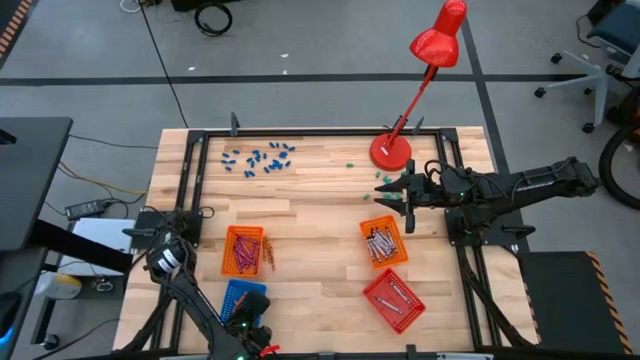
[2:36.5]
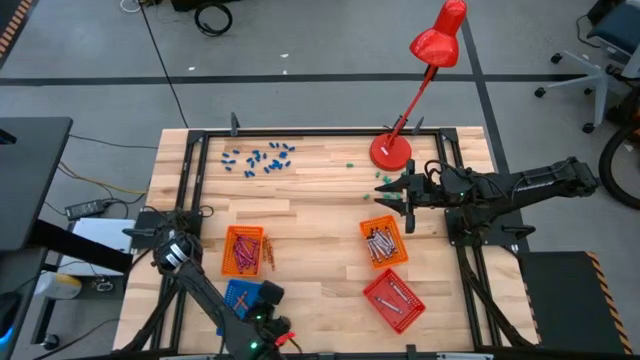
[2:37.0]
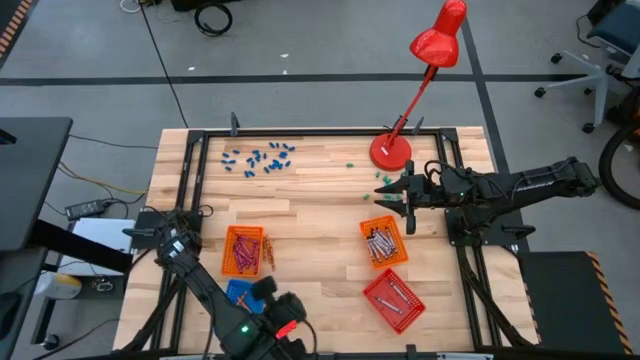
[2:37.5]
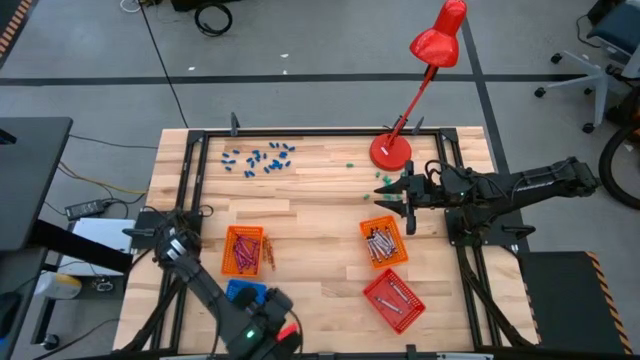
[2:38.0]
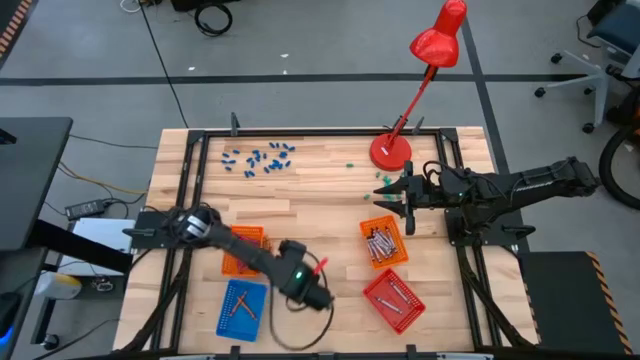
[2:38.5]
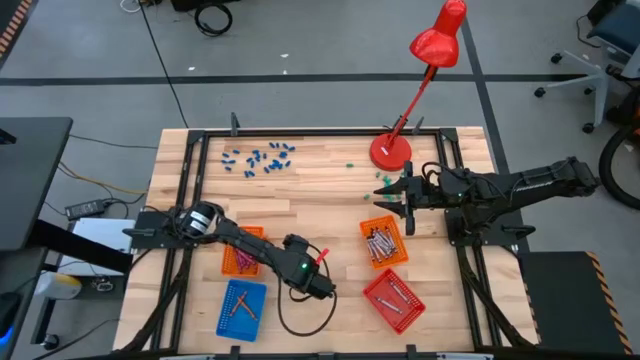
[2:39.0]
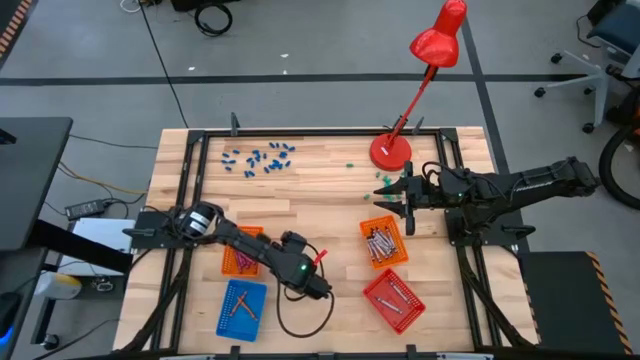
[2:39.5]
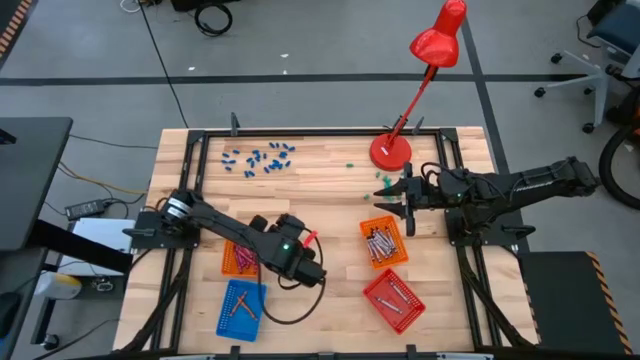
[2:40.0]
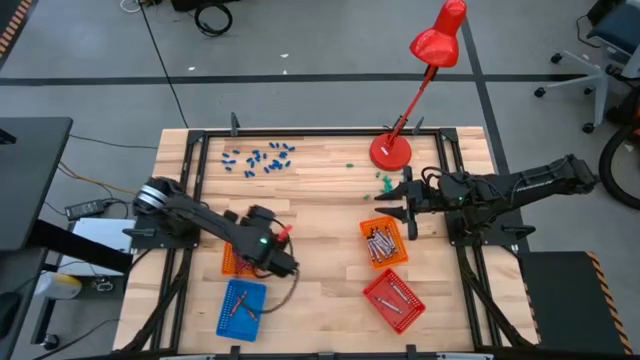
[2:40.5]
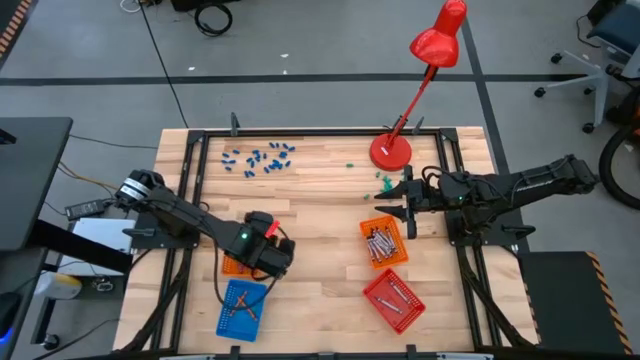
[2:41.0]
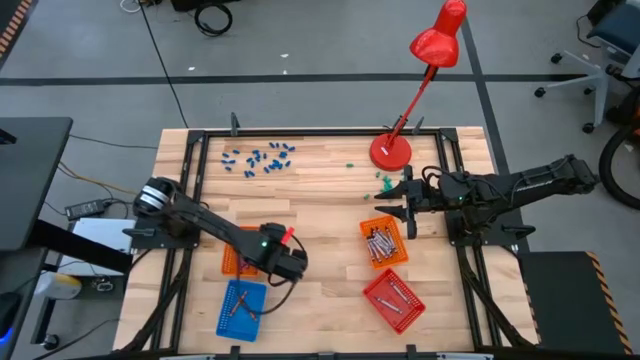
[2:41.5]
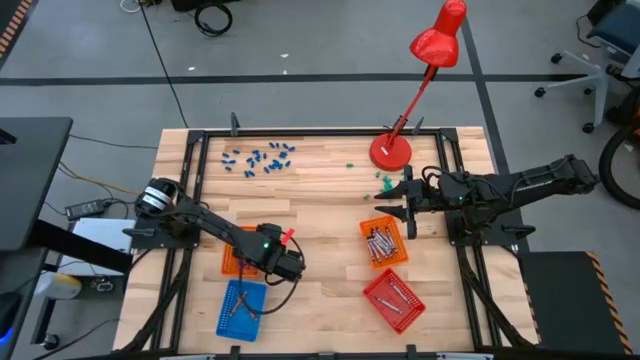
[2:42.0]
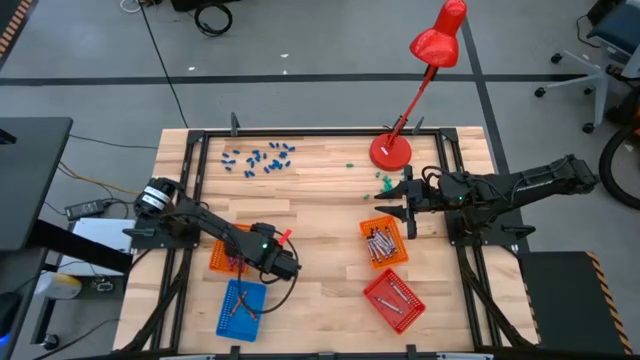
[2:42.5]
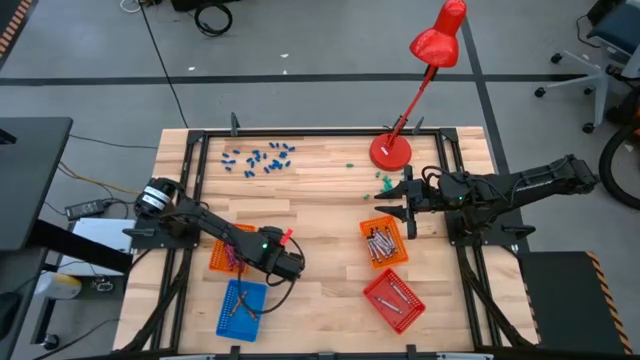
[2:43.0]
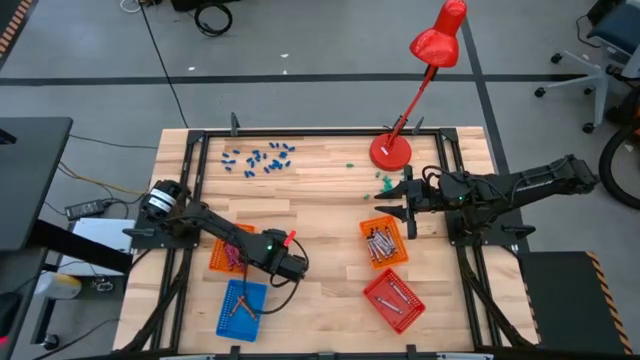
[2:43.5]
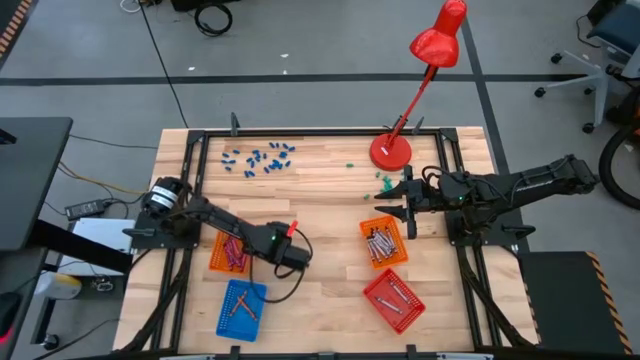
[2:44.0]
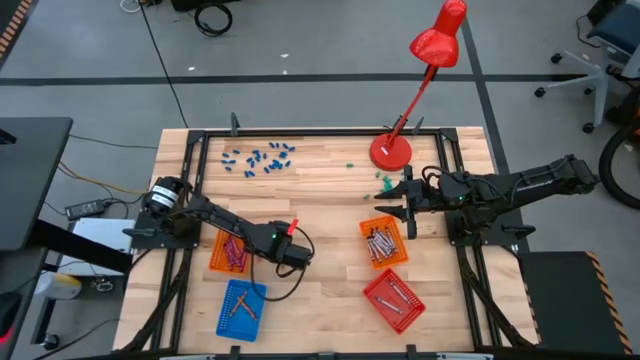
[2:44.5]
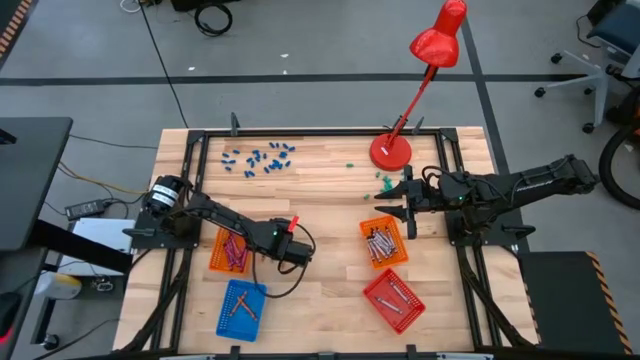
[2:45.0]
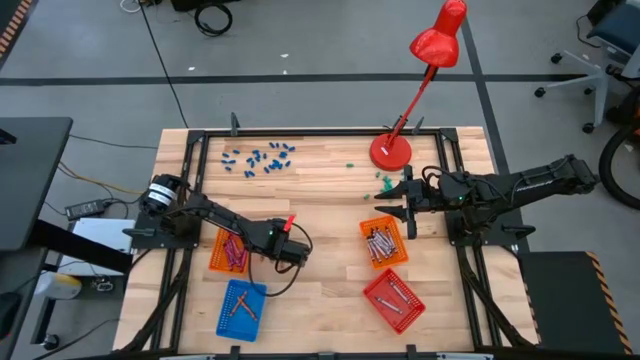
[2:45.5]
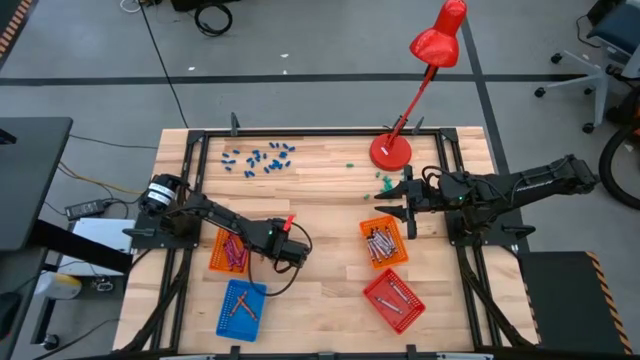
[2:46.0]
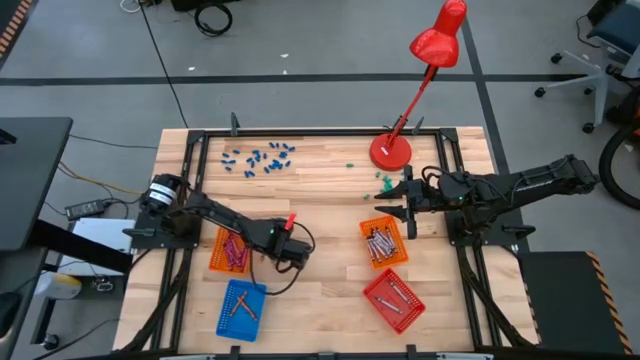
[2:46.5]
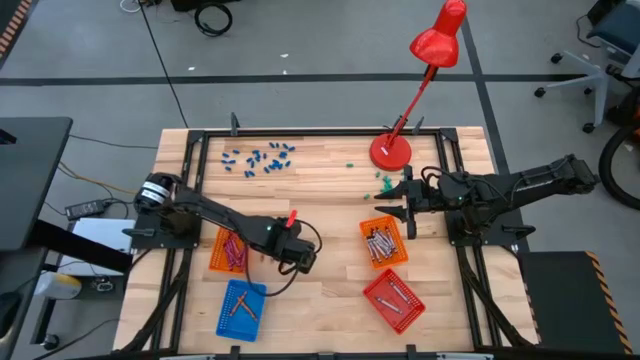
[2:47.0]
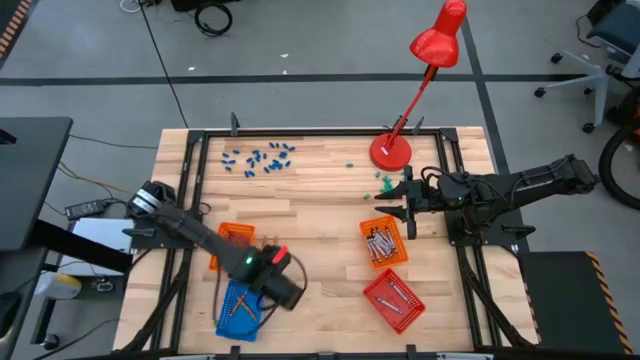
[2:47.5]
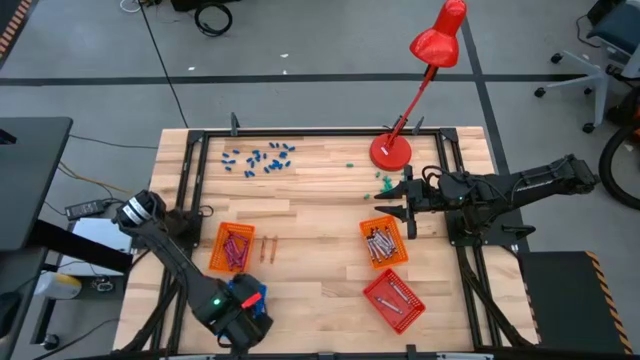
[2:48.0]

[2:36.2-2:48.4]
Task: Sort crayons
Put the orange crayon into the blue bin

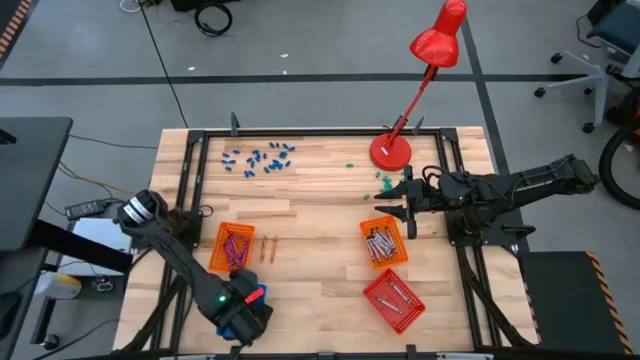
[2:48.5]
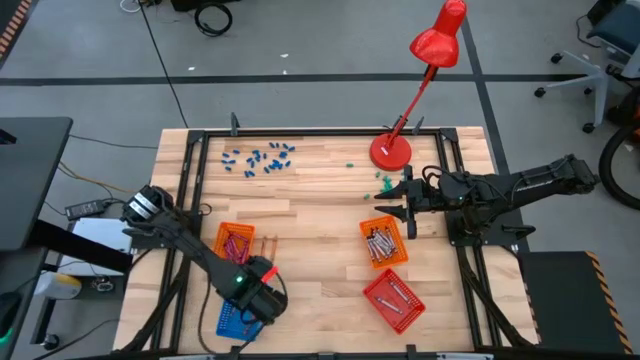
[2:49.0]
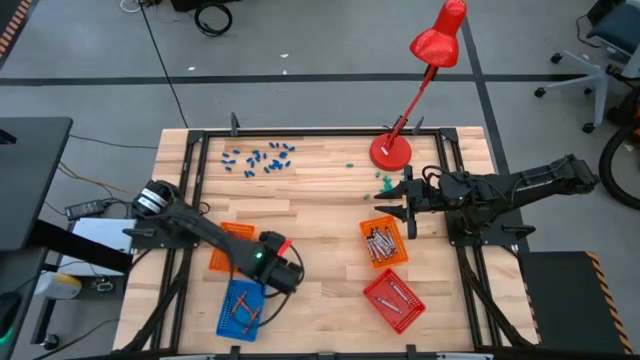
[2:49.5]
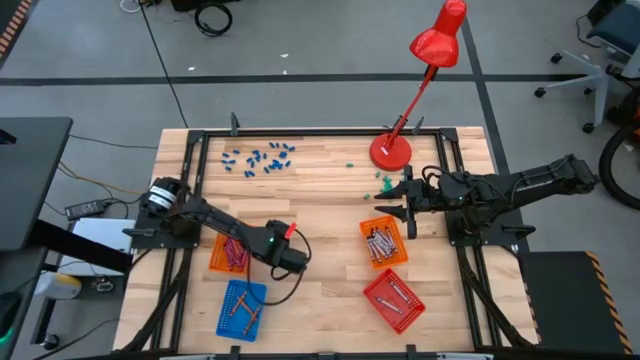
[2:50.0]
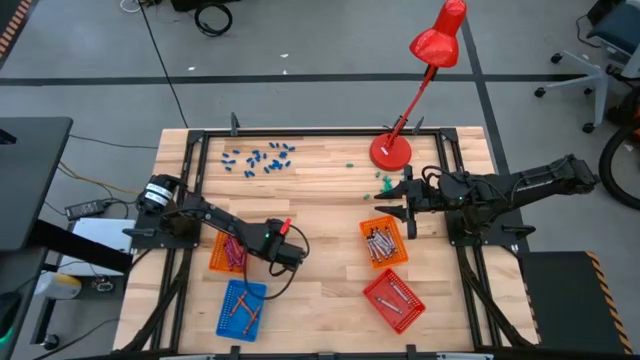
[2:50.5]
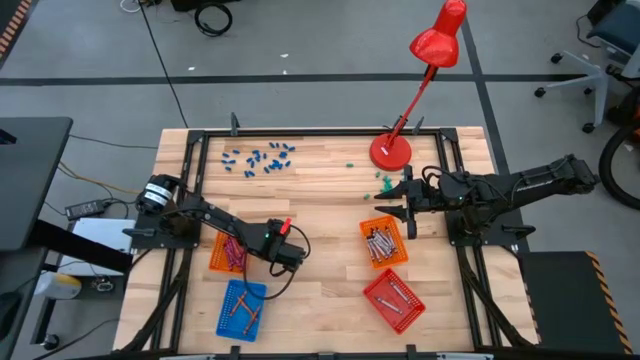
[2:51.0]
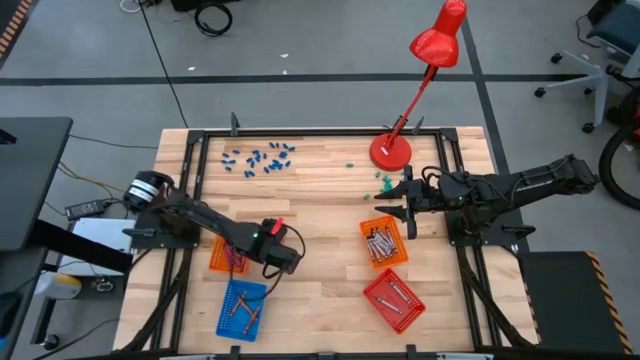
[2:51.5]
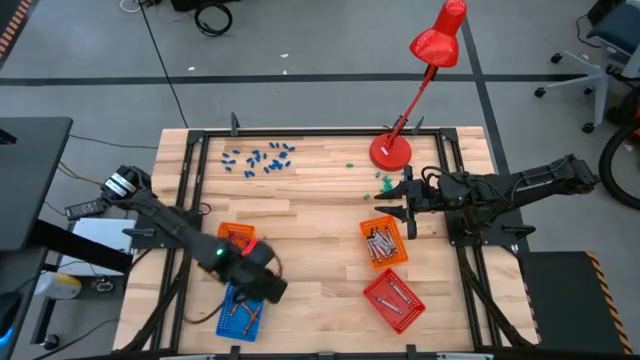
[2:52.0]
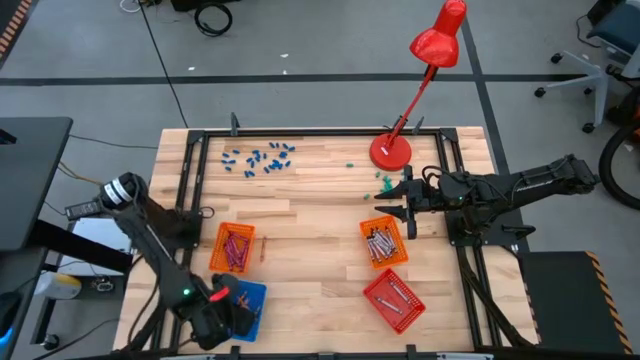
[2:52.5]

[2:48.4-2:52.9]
Put the orange crayon into the blue bin

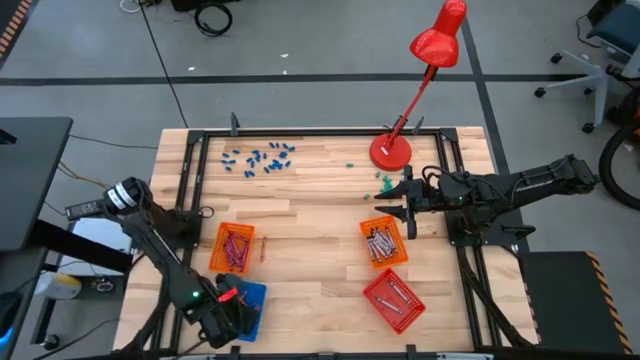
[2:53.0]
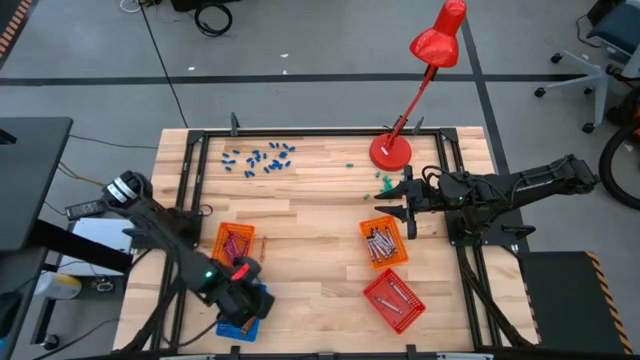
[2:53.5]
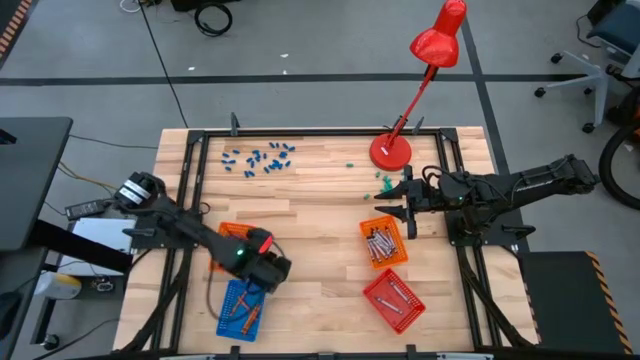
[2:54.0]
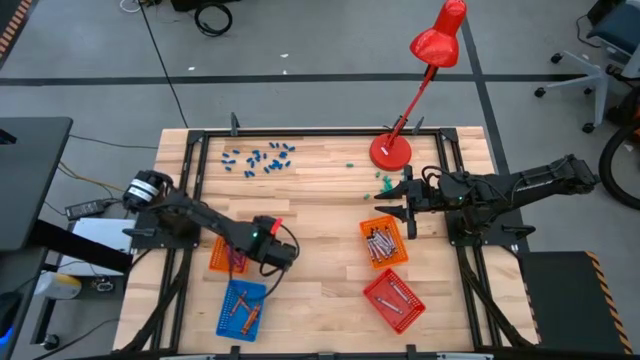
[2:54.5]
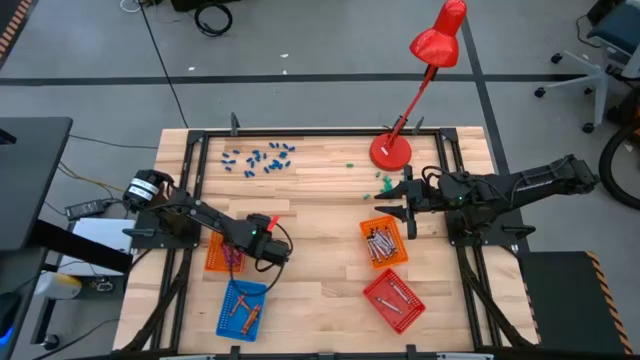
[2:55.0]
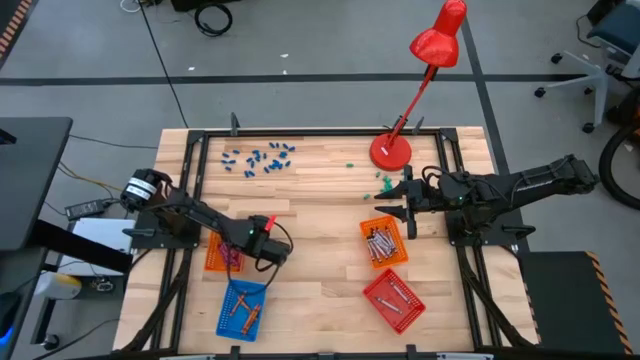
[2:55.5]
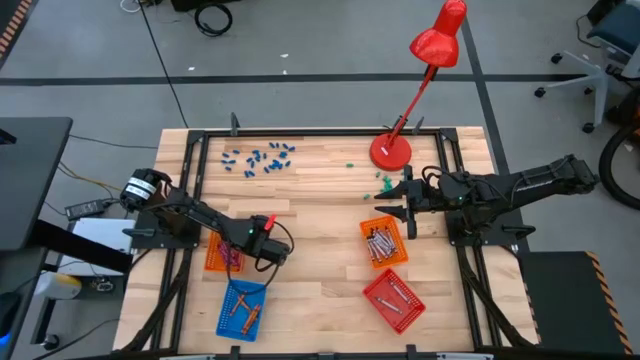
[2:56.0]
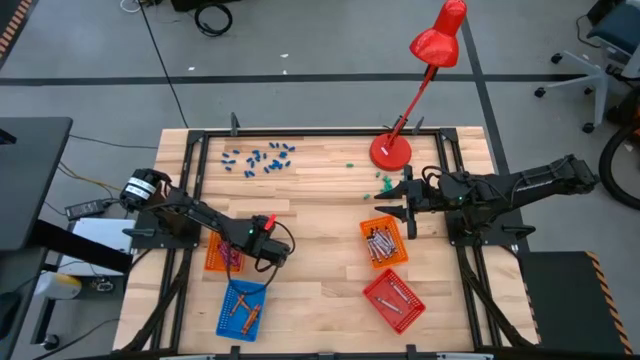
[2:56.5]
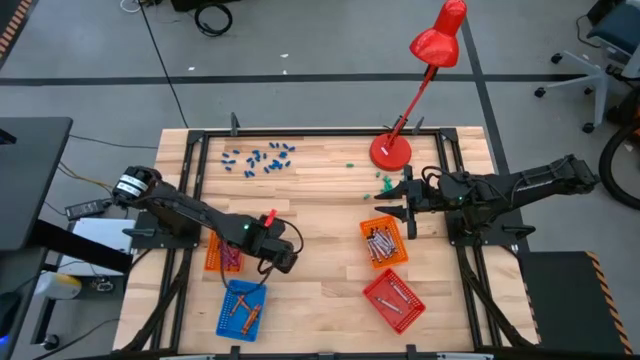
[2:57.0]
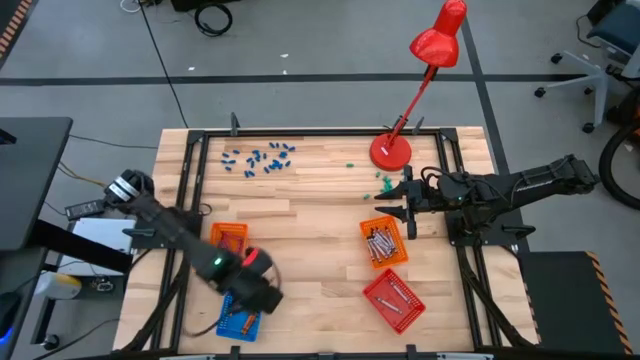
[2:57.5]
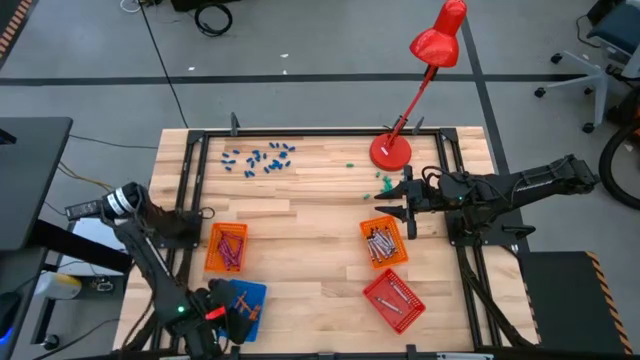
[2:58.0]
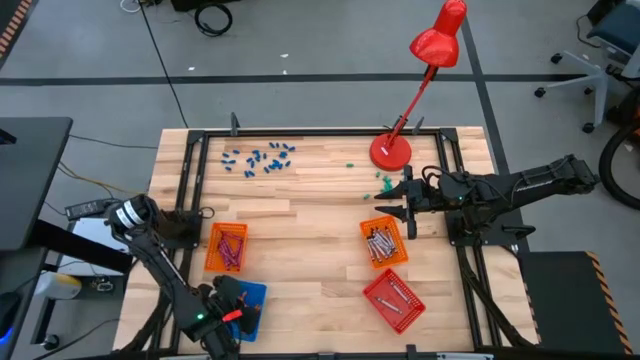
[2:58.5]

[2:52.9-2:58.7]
Put the orange crayon into the blue bin
